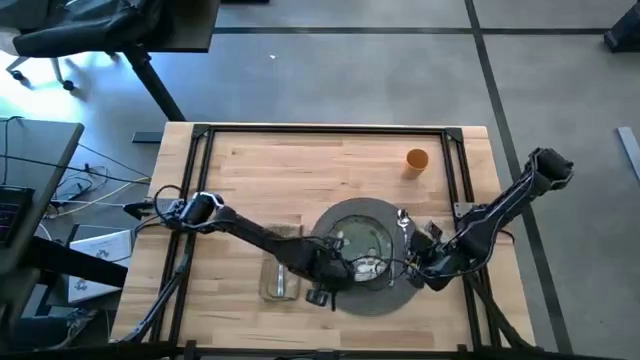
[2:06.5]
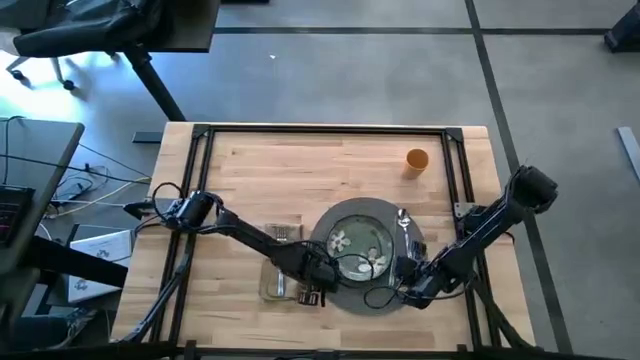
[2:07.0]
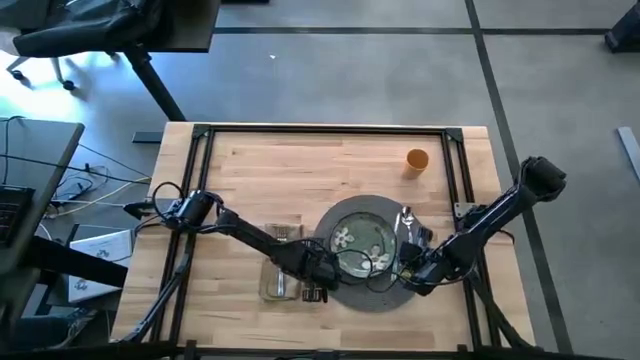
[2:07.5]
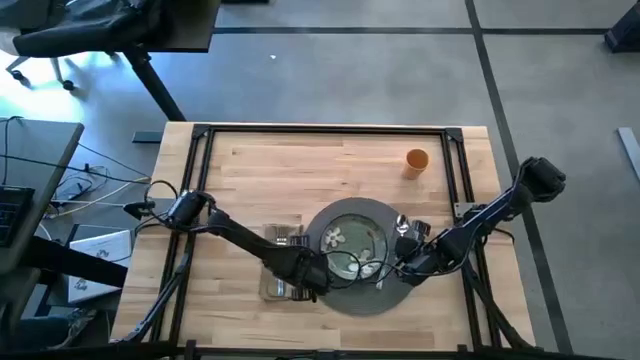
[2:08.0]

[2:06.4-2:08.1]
Task: Set table place
Adjust the gray placemat

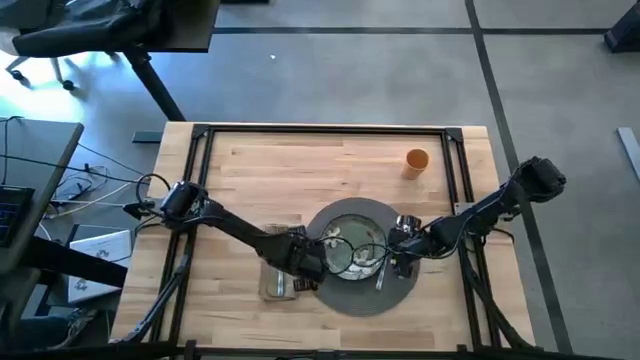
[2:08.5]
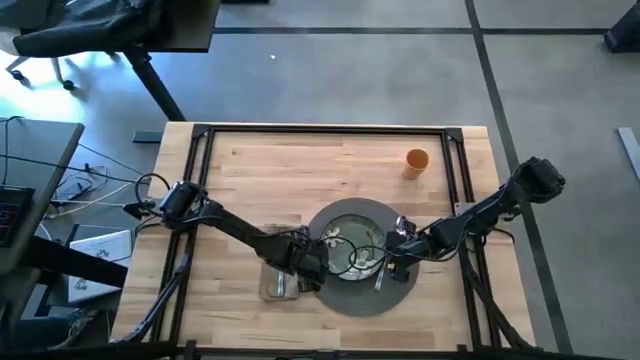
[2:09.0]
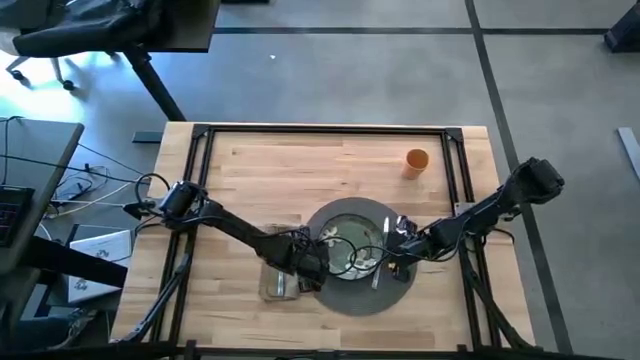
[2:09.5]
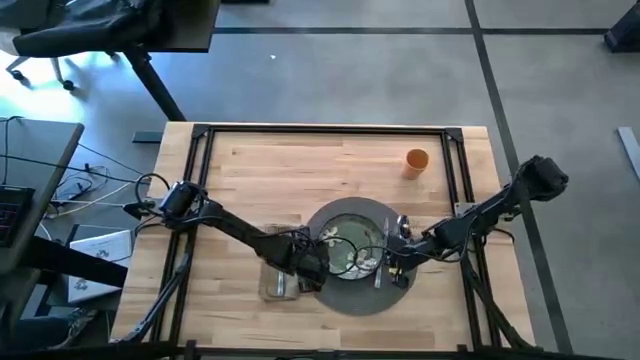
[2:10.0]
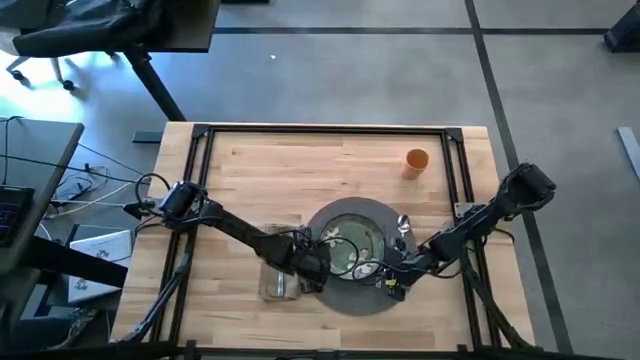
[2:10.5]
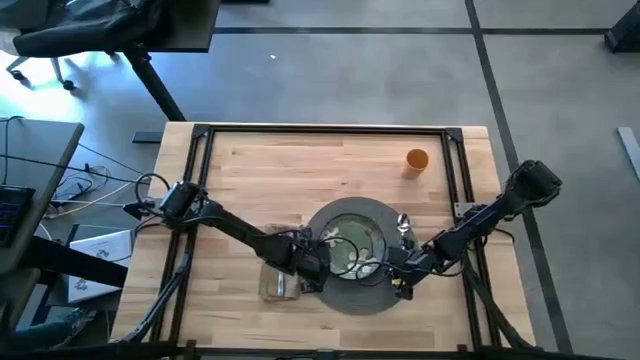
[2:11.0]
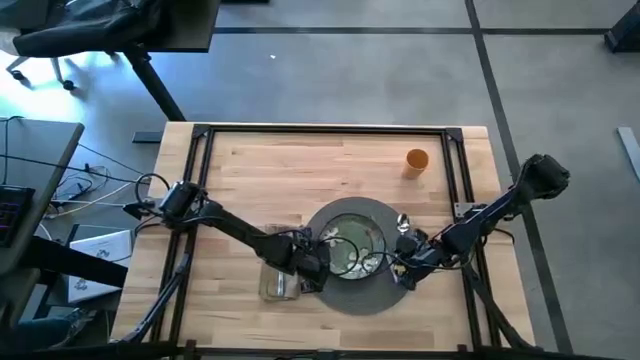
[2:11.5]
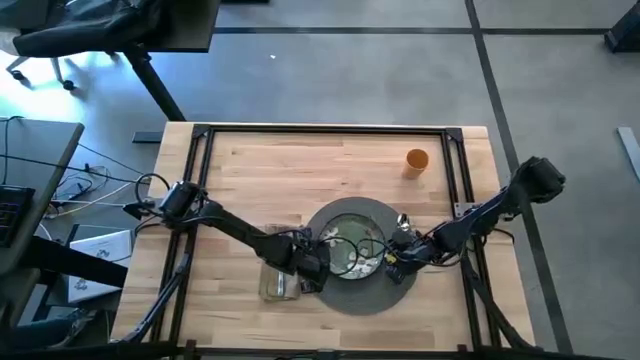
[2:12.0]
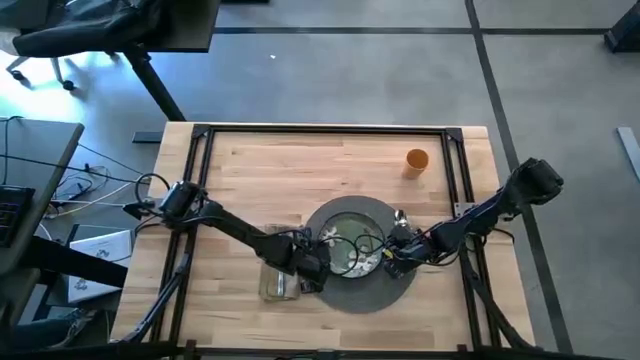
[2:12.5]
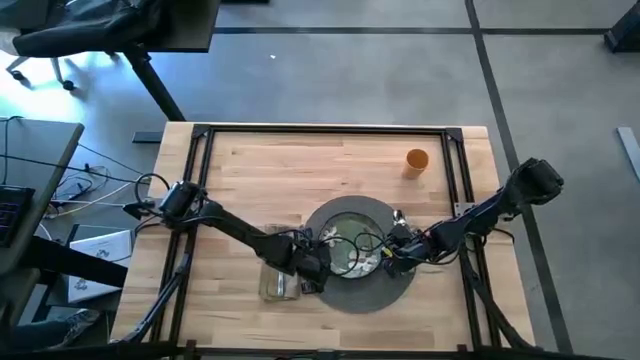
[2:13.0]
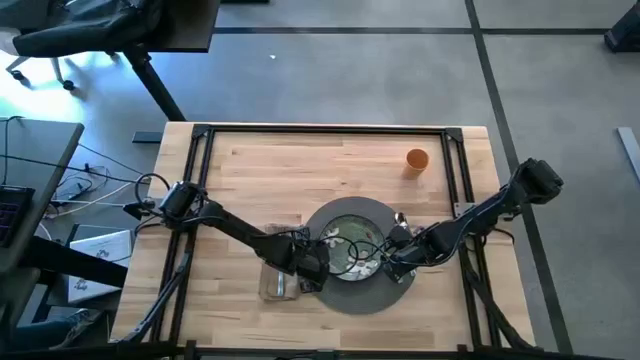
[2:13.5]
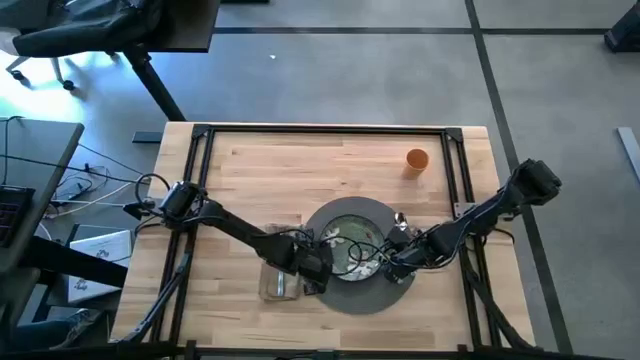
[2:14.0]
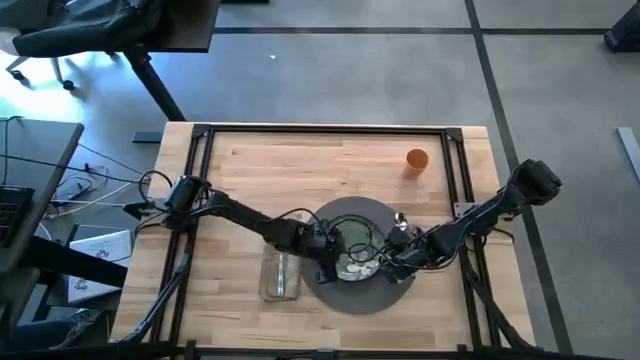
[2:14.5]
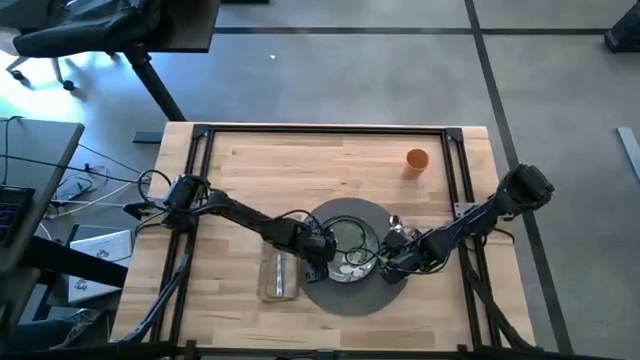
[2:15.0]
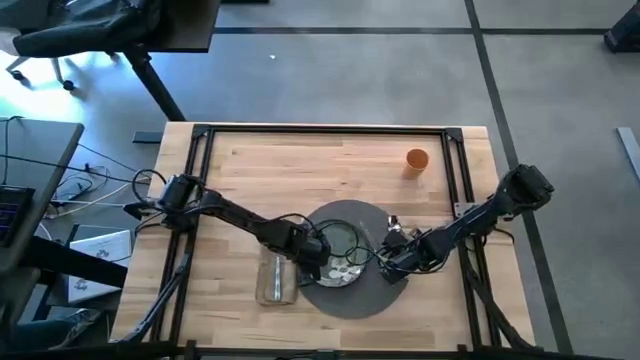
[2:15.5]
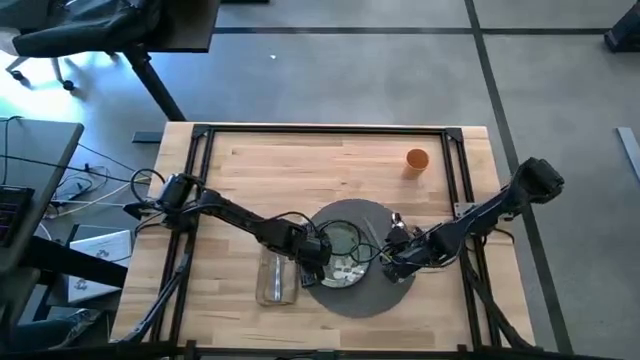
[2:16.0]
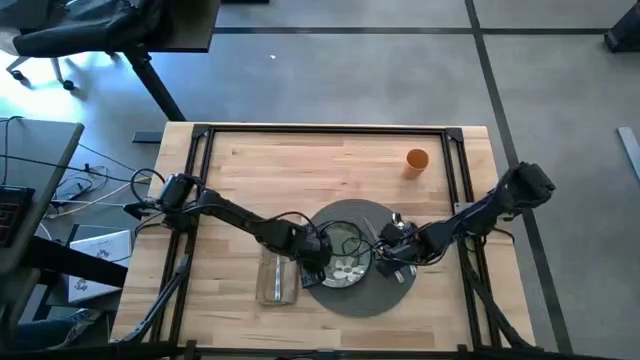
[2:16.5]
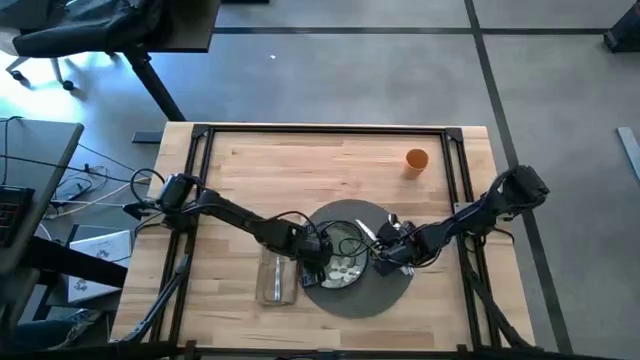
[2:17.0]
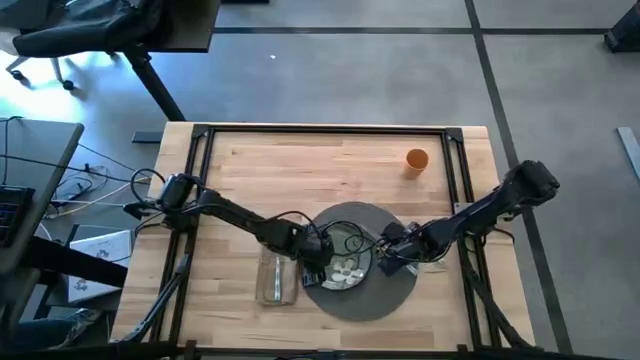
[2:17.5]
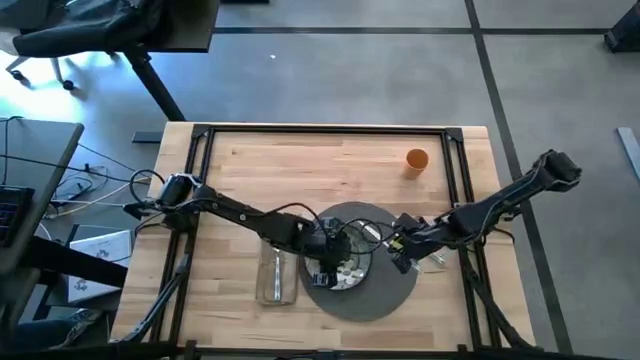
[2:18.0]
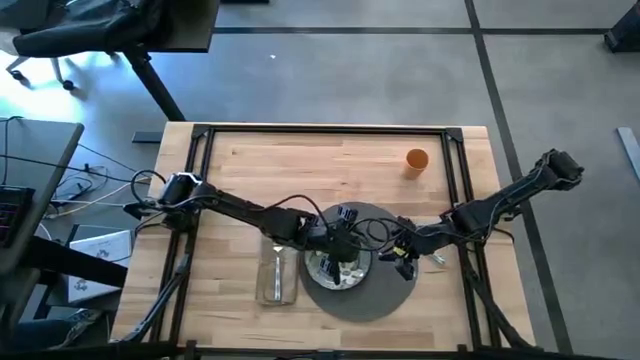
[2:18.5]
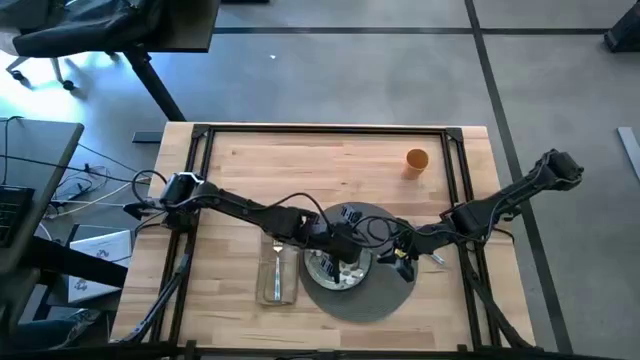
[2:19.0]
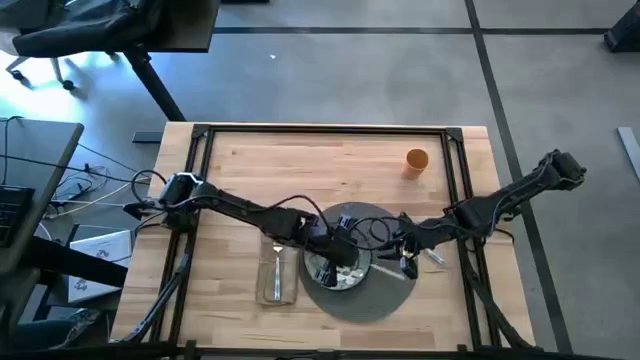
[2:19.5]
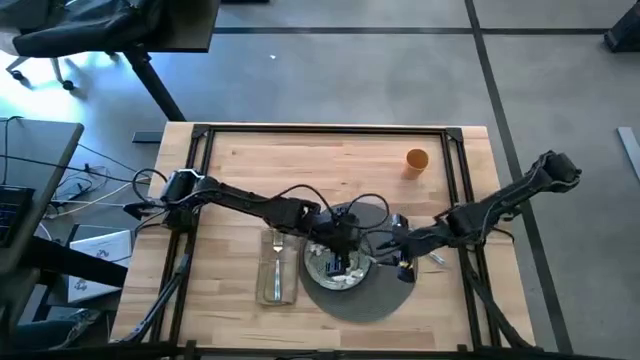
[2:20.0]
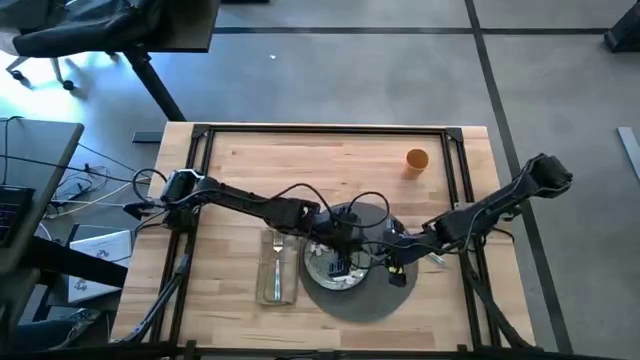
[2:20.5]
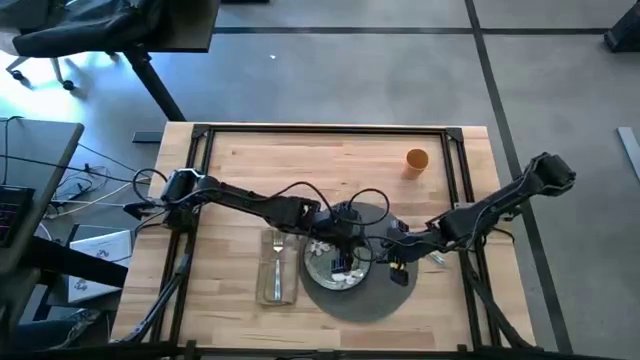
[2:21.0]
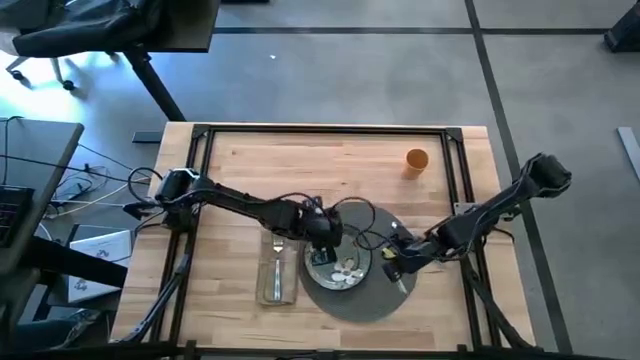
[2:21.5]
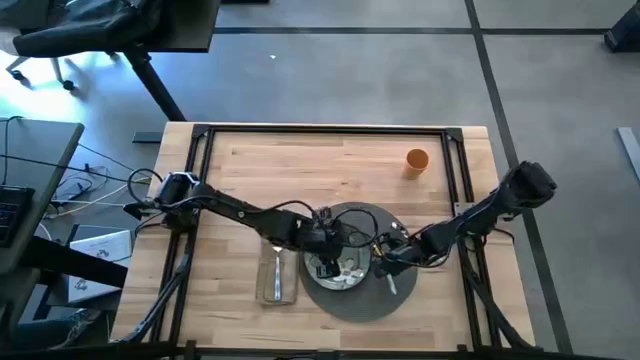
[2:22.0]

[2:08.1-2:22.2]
Adjust the silverware on the gray placemat

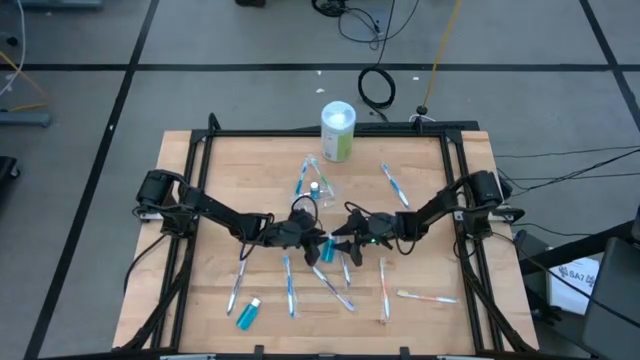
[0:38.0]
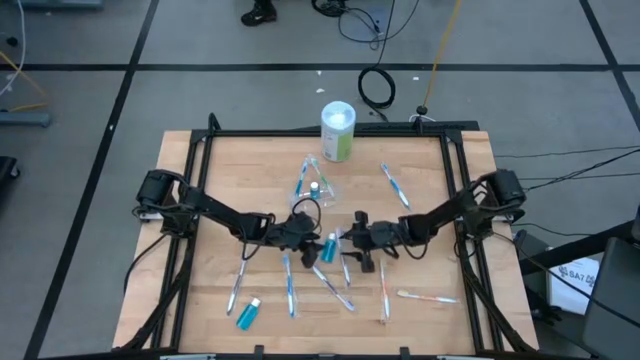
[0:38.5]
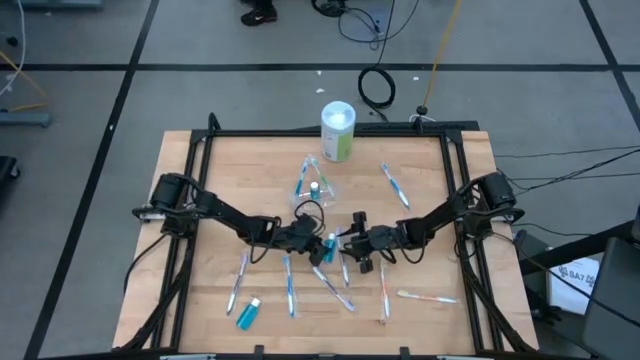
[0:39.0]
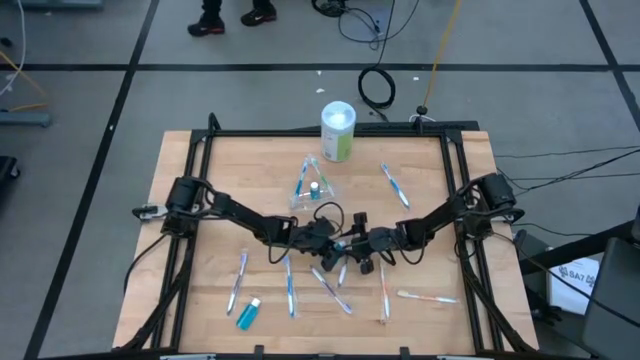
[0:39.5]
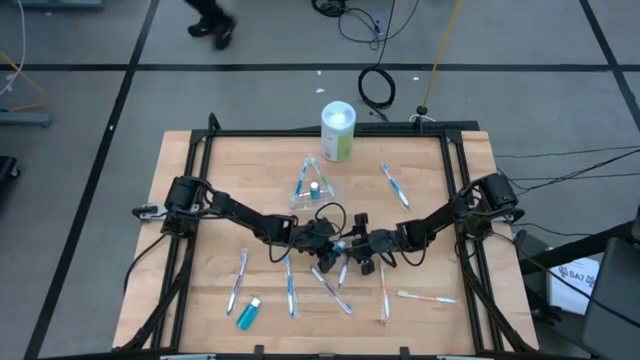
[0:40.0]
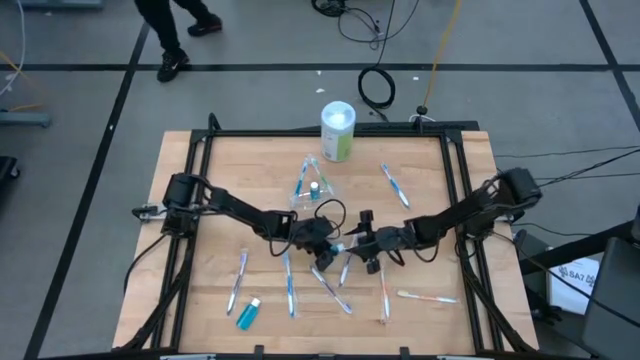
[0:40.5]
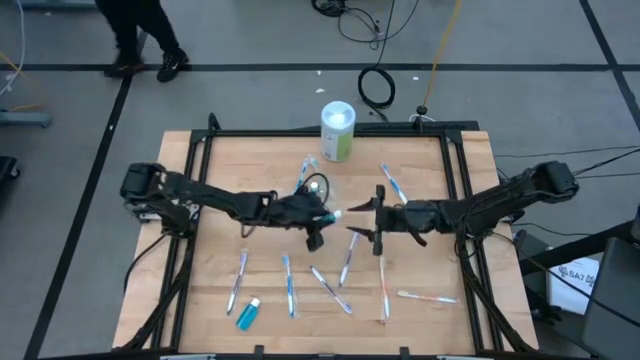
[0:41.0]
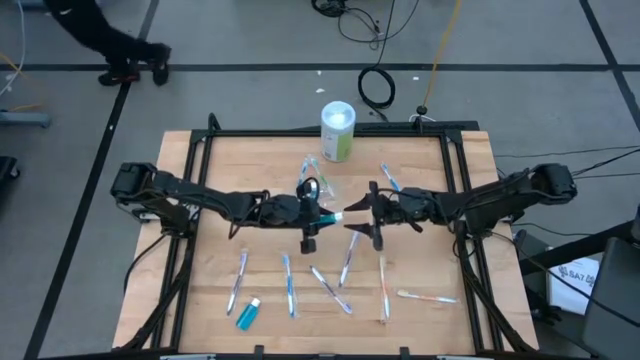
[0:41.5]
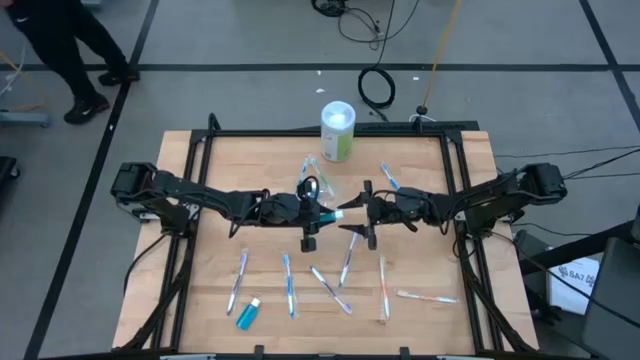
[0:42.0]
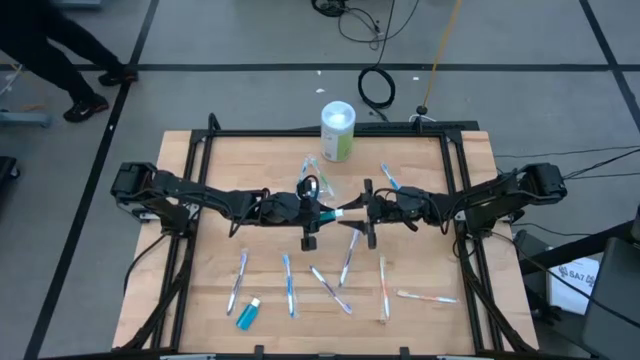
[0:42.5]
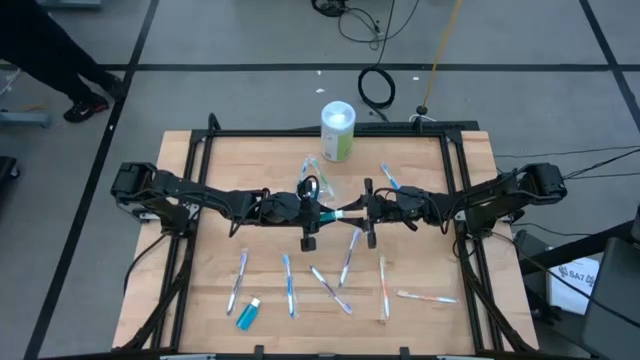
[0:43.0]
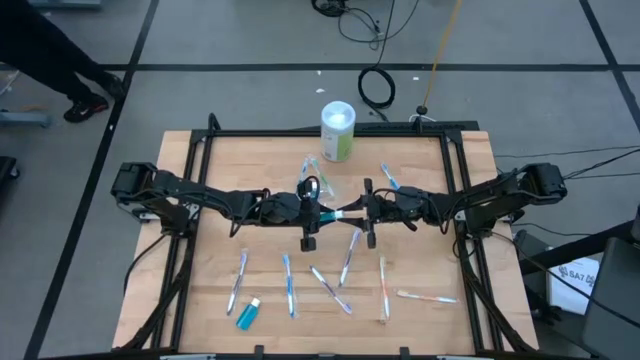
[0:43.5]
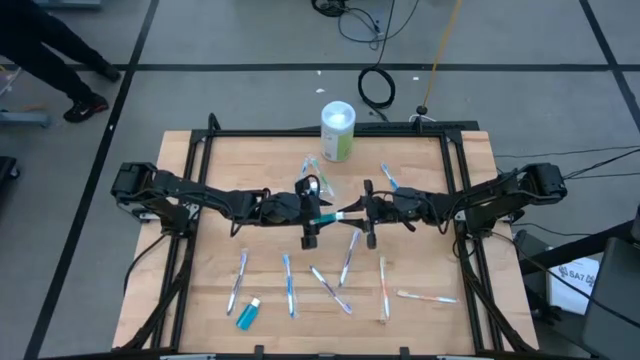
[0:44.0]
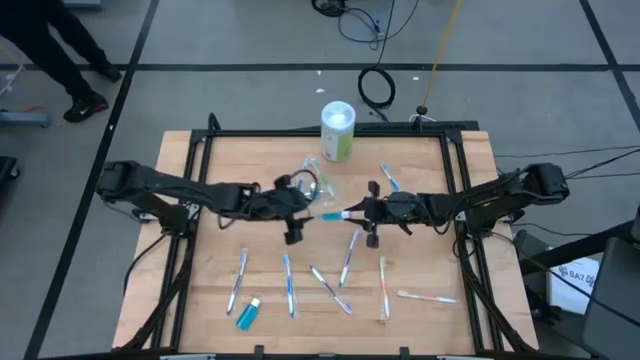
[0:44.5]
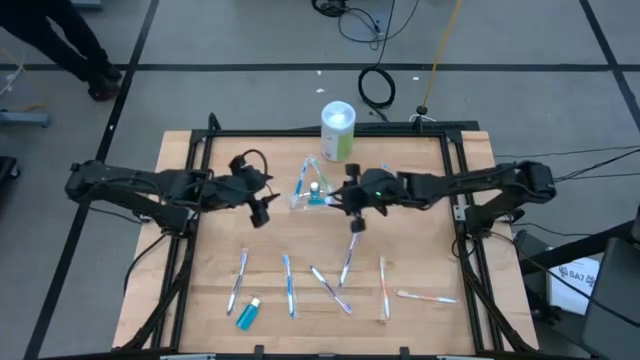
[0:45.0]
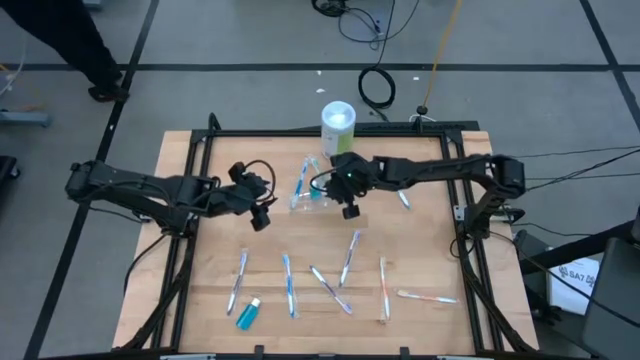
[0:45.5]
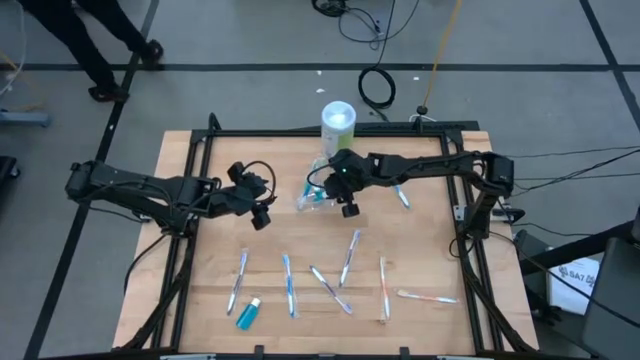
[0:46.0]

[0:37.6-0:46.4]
Task: Pick & Place toothbrushing station
Put the top blue mouthwash into the transparent organizer
